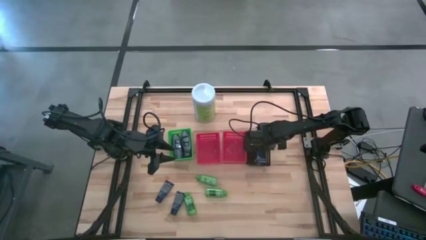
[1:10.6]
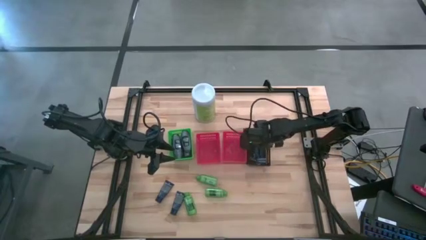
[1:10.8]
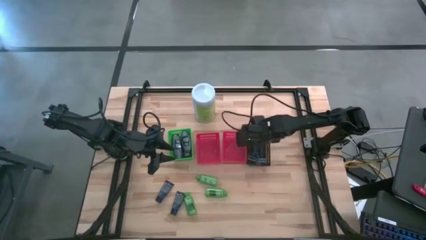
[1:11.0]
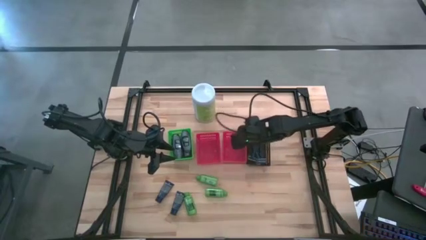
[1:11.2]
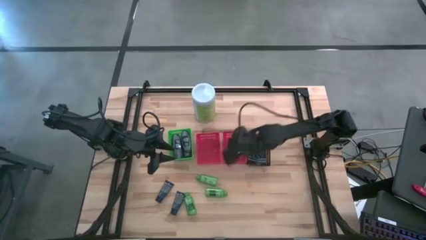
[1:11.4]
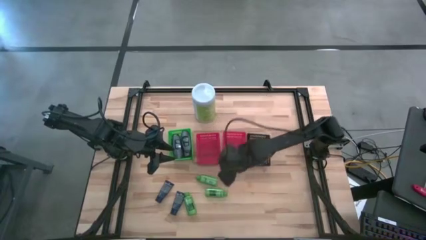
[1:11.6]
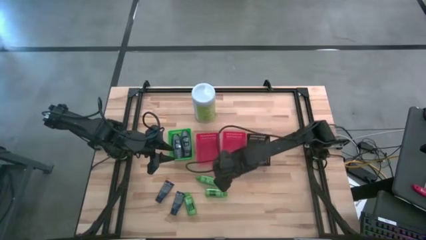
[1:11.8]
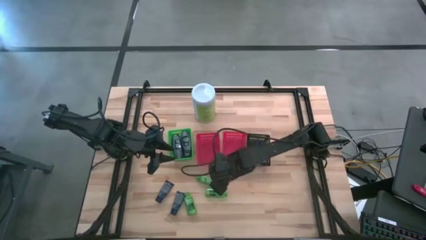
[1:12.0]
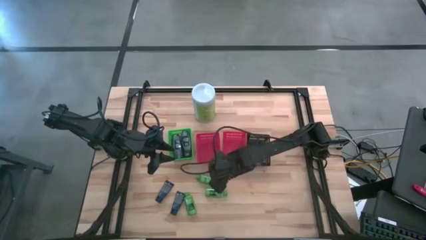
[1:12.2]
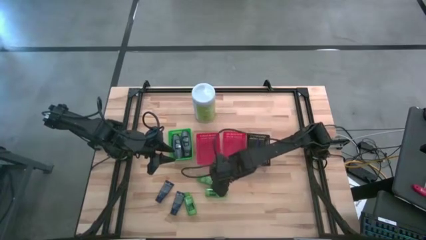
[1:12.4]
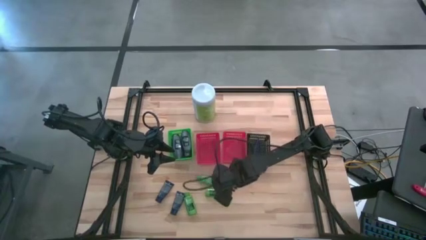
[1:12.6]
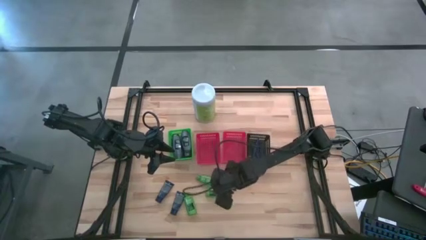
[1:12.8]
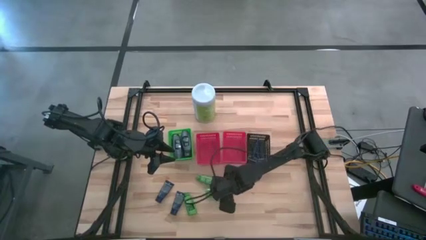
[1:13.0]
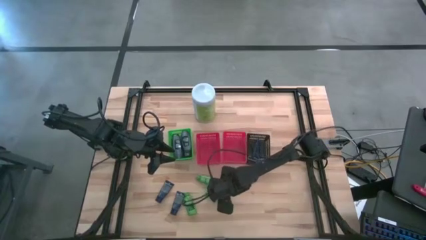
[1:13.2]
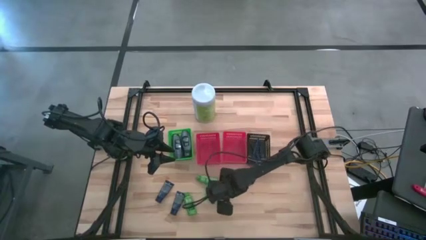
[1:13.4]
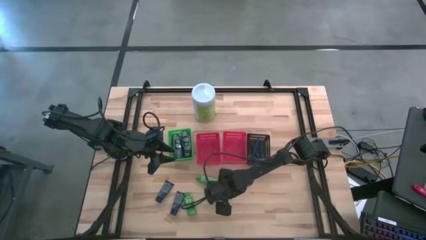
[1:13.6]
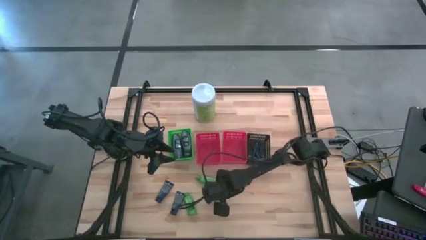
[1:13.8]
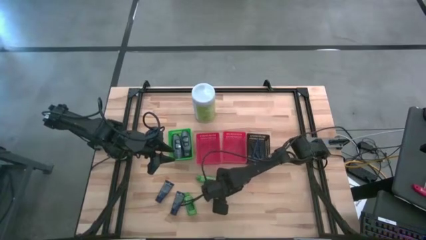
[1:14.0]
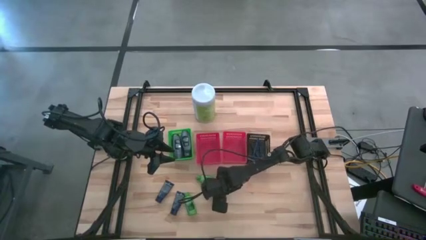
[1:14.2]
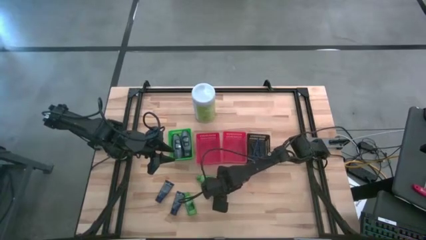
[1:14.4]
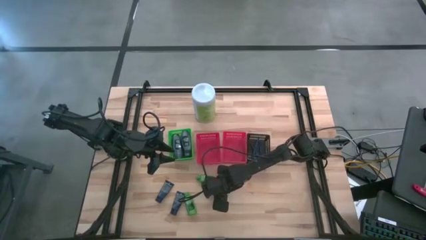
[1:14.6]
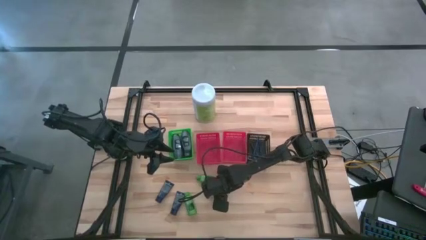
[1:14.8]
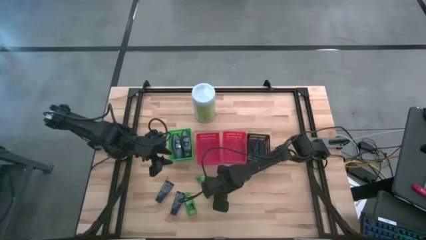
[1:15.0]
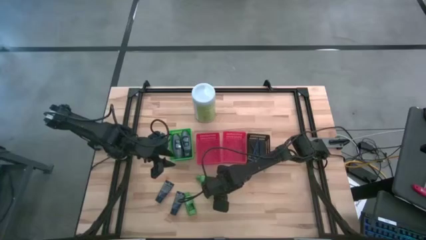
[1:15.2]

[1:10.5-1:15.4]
Task: Pick & Place Travel size toiletries
Put the middle green shampoo into the right red bin

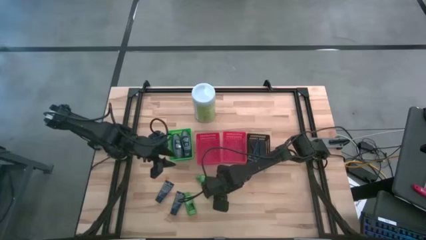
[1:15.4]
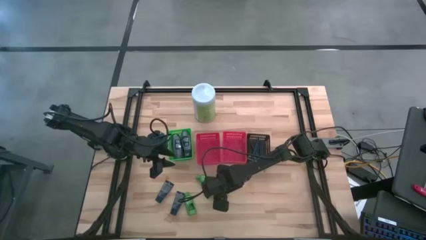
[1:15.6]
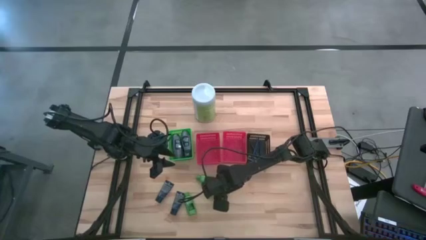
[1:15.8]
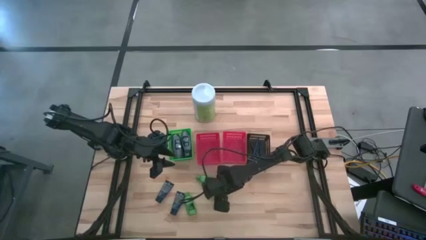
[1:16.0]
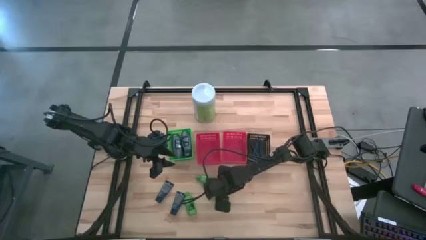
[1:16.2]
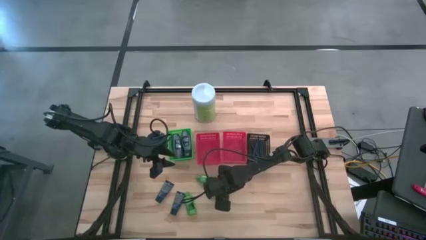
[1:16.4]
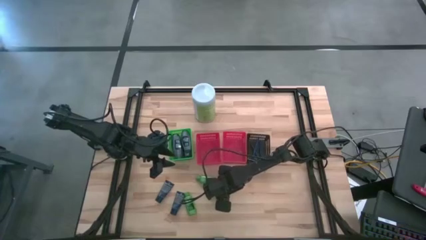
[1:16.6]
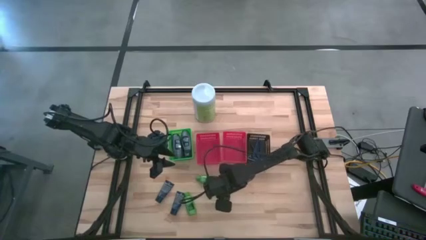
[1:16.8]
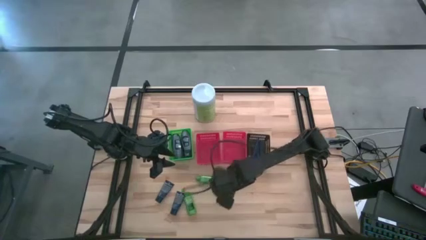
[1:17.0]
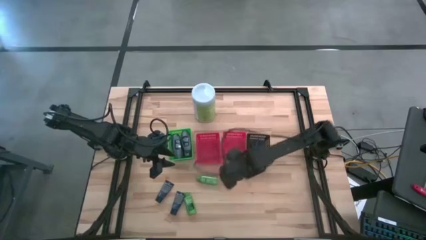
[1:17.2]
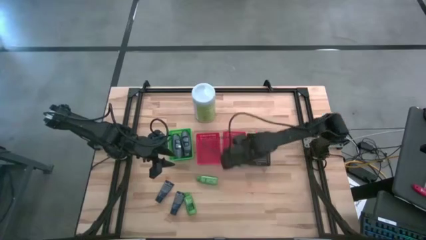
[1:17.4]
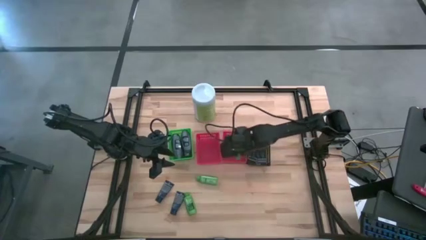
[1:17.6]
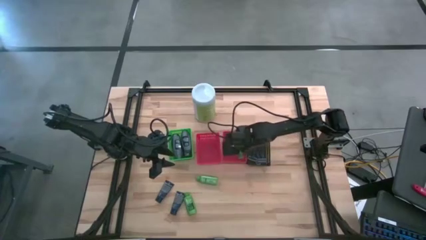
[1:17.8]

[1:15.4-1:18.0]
Put the bottom right green shampoo into the right red bin

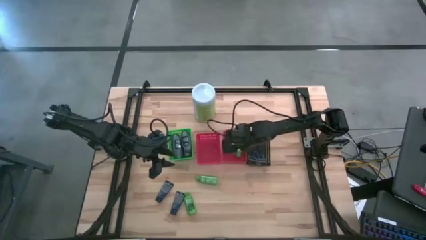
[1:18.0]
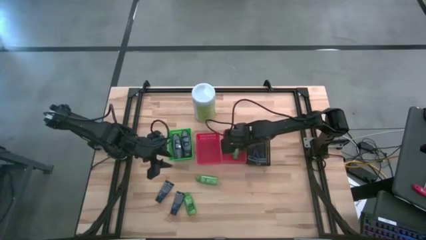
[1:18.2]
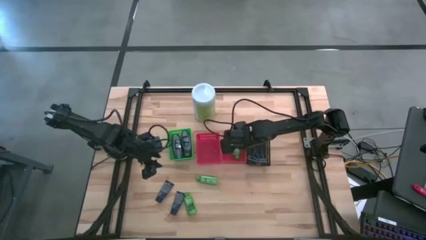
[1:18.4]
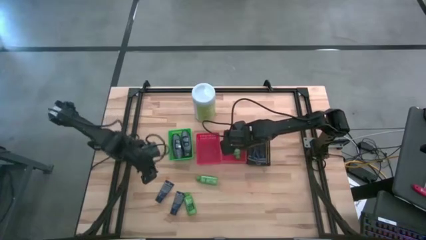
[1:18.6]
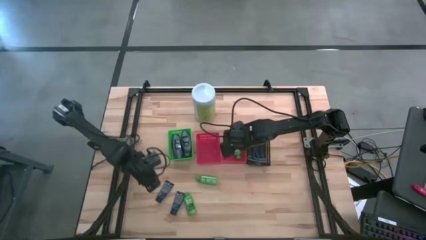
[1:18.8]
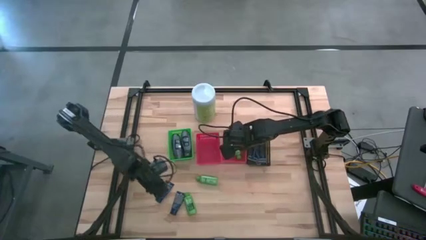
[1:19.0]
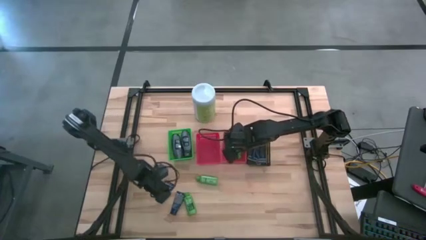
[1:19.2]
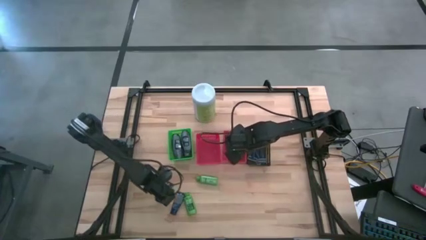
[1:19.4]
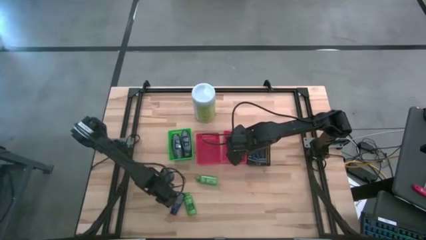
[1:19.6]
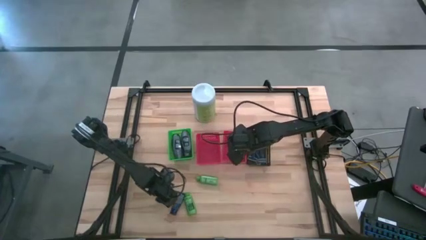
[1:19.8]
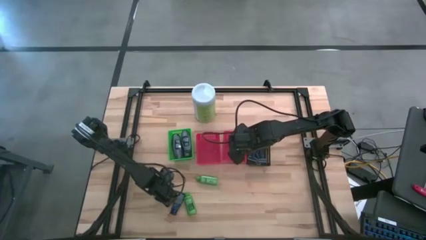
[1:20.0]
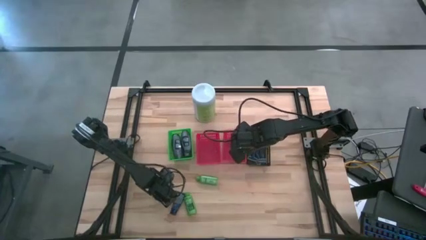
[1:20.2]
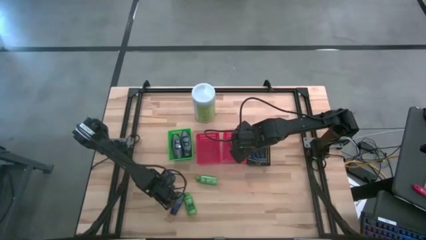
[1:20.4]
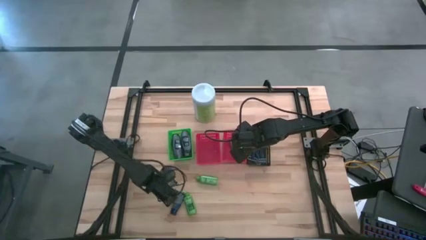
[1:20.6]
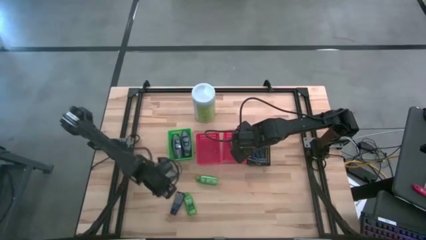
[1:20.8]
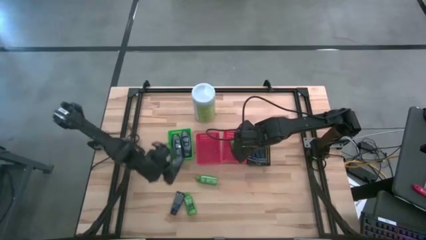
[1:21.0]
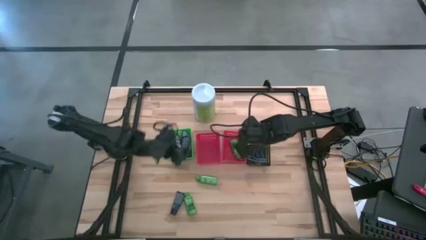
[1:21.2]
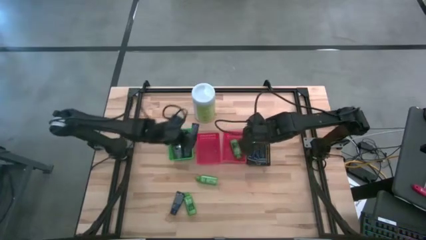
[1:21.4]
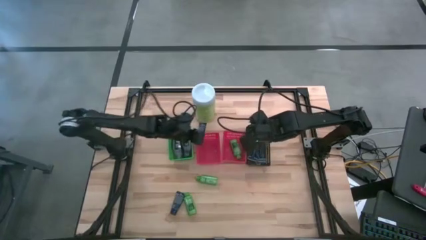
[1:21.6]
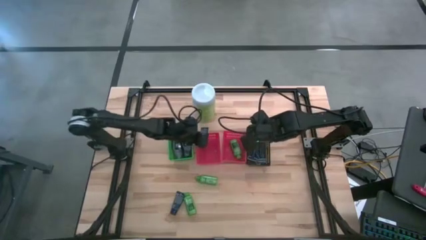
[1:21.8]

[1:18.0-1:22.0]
Put the left shave cream into the left red bin

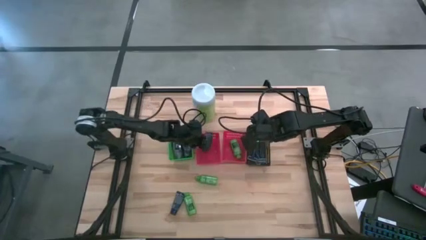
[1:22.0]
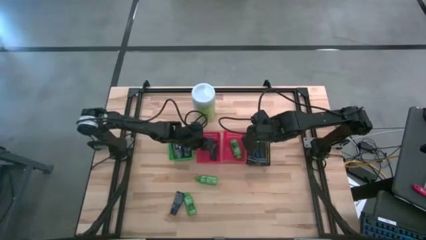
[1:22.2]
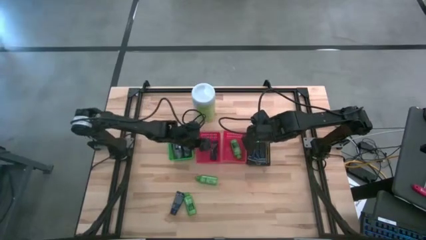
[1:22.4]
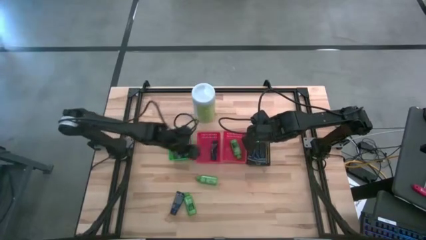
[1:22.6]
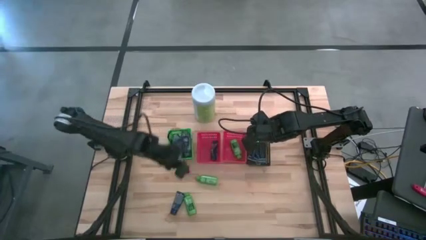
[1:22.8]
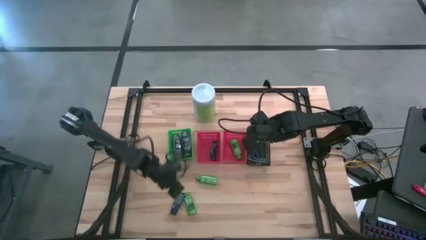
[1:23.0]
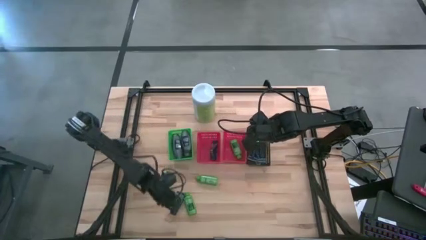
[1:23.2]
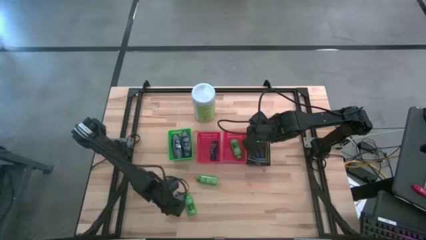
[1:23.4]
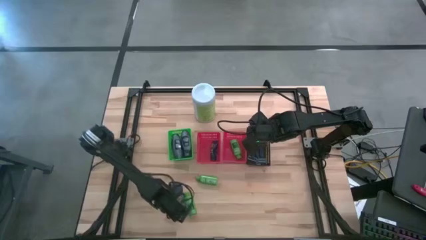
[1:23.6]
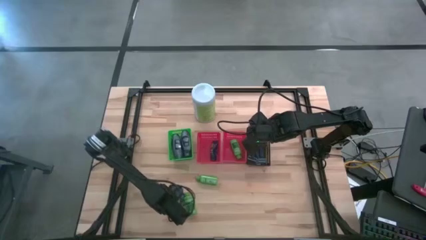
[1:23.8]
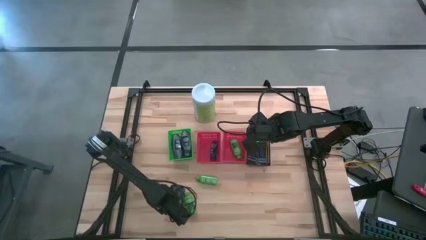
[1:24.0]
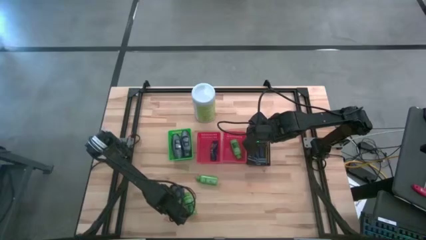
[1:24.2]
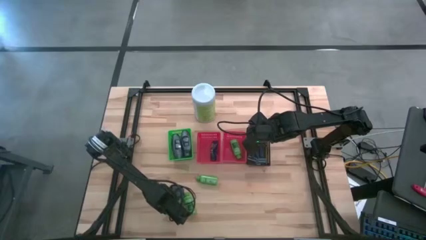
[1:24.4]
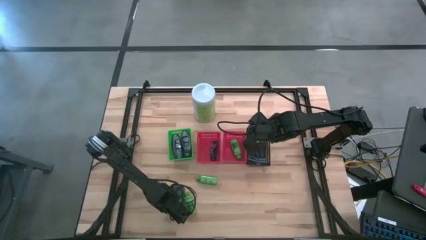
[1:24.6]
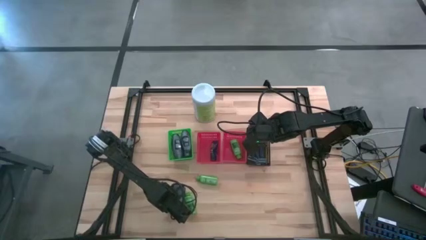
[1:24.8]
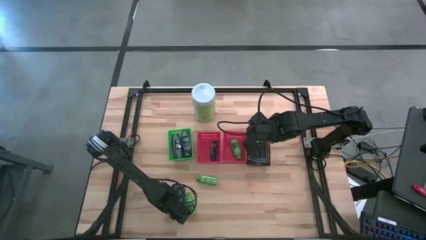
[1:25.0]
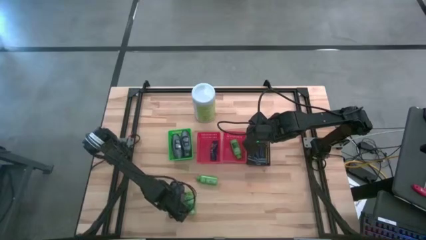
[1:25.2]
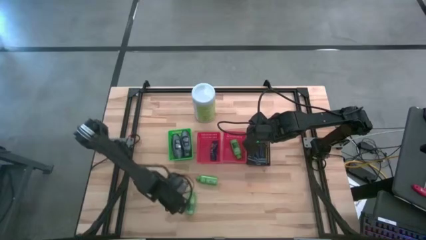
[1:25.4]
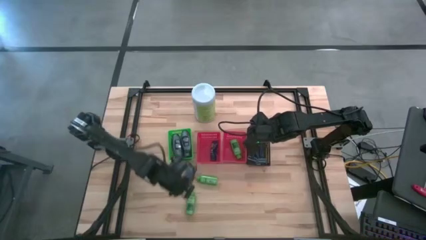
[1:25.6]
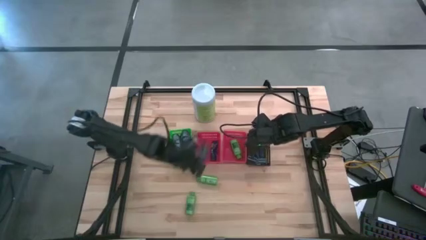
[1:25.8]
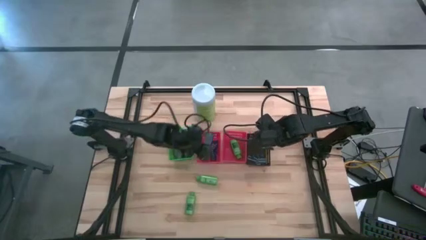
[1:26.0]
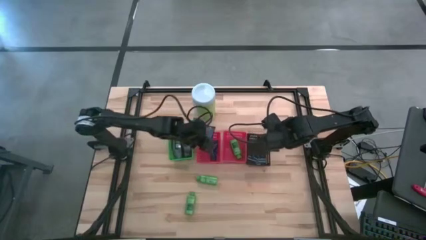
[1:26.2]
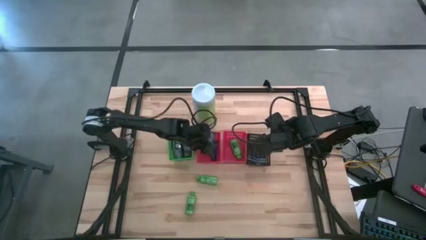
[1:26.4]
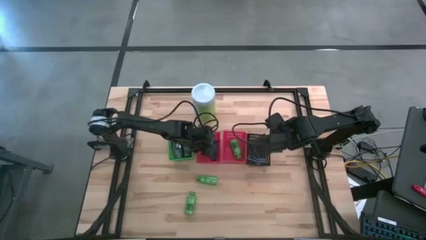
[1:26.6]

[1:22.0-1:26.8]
Put the shave cream into the left red bin
